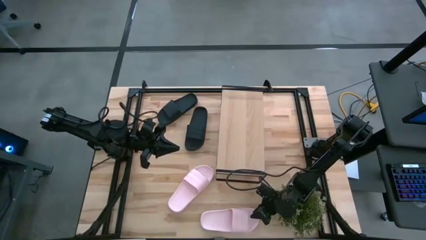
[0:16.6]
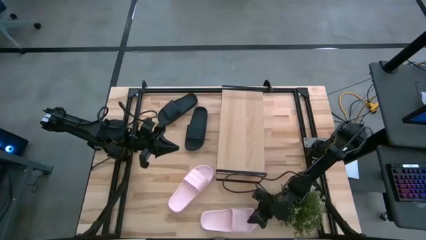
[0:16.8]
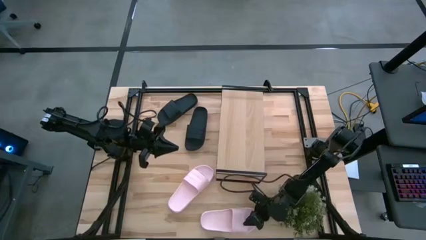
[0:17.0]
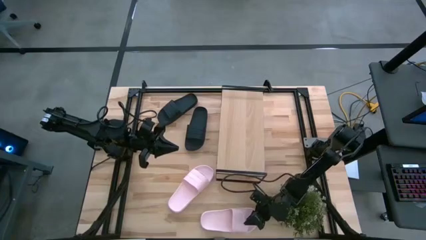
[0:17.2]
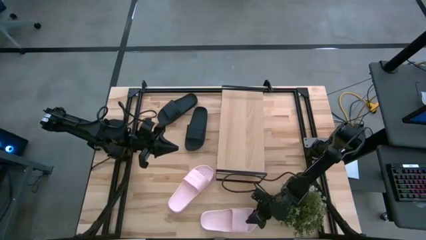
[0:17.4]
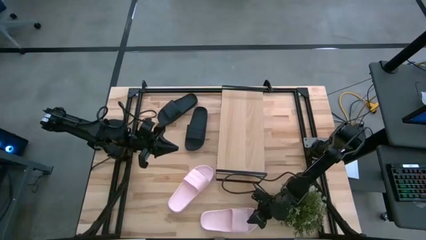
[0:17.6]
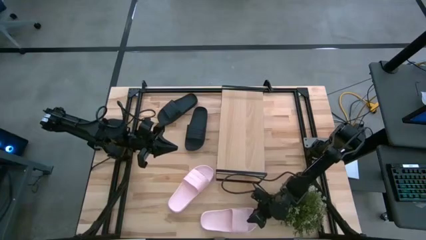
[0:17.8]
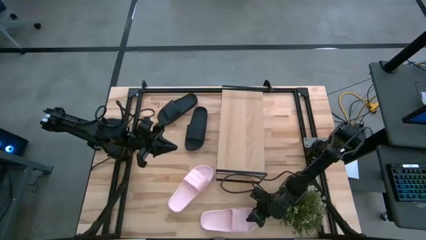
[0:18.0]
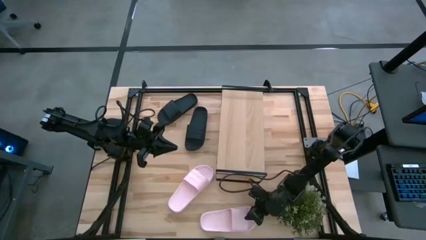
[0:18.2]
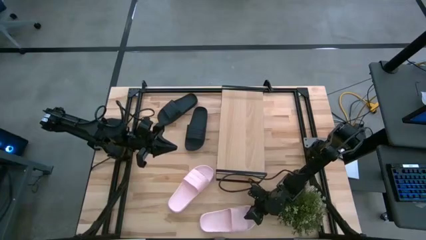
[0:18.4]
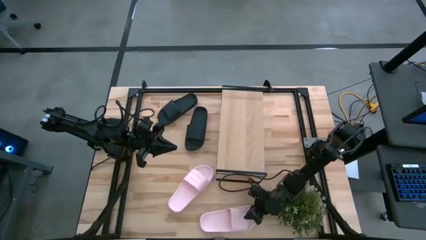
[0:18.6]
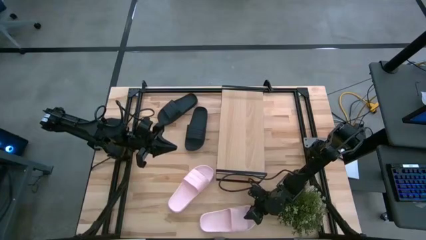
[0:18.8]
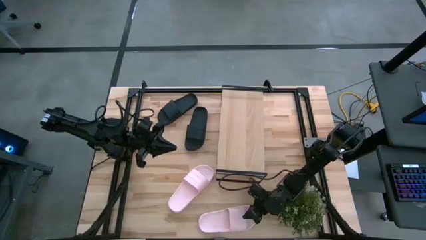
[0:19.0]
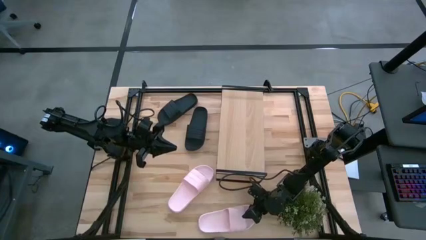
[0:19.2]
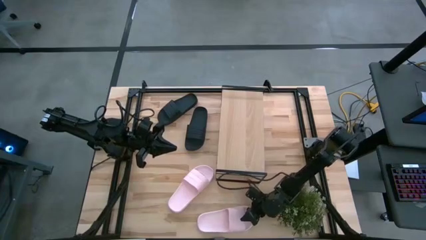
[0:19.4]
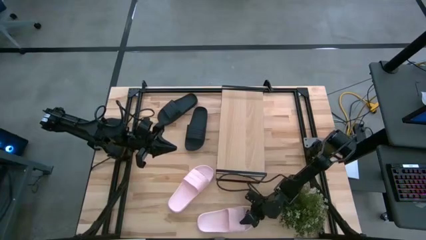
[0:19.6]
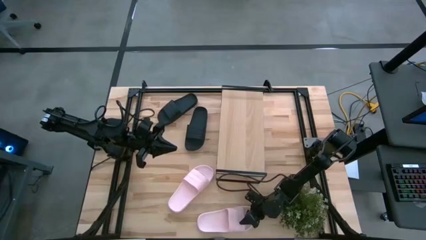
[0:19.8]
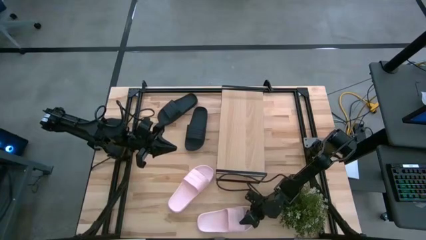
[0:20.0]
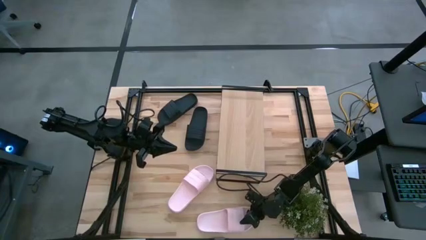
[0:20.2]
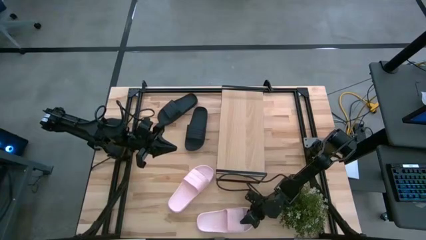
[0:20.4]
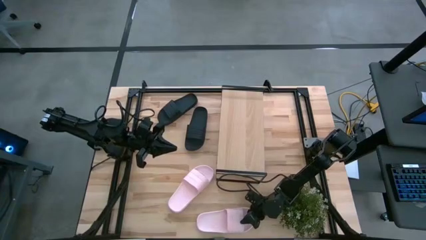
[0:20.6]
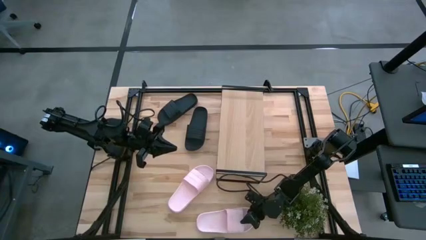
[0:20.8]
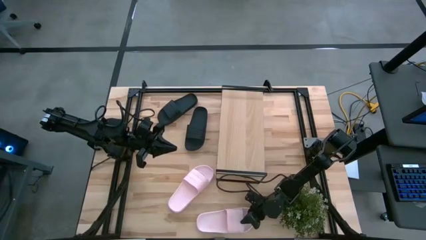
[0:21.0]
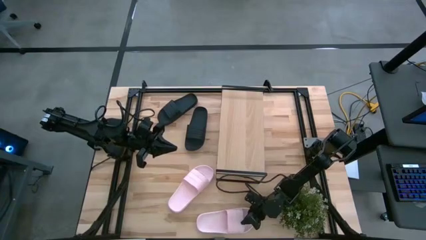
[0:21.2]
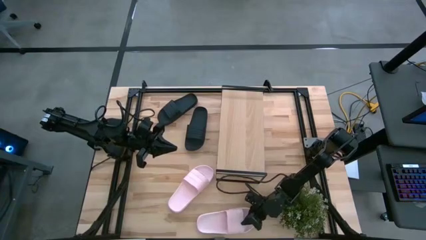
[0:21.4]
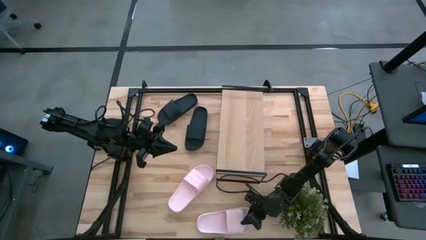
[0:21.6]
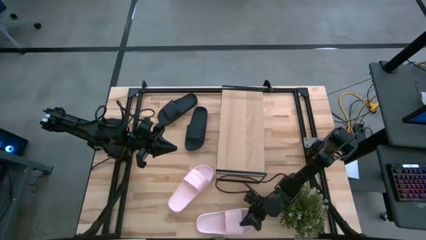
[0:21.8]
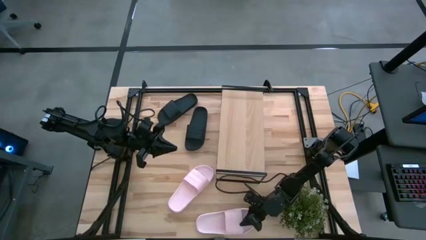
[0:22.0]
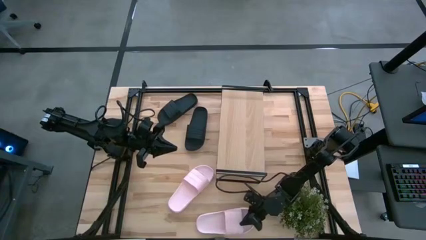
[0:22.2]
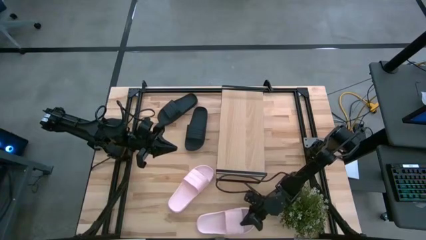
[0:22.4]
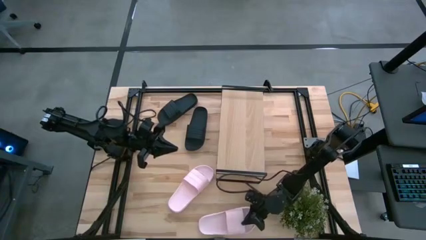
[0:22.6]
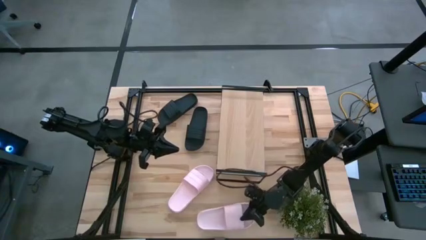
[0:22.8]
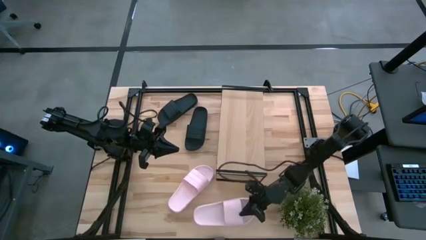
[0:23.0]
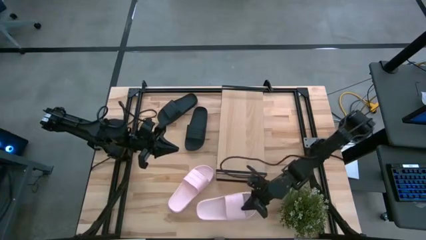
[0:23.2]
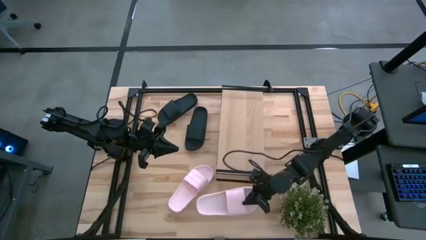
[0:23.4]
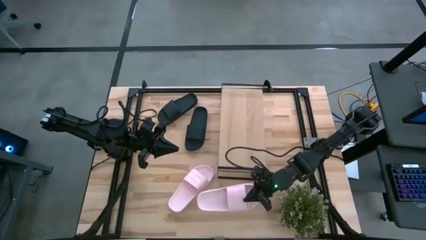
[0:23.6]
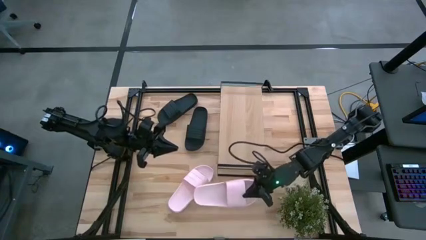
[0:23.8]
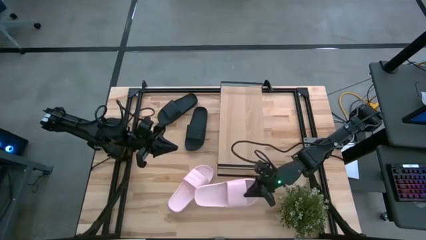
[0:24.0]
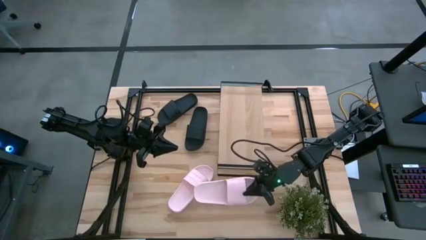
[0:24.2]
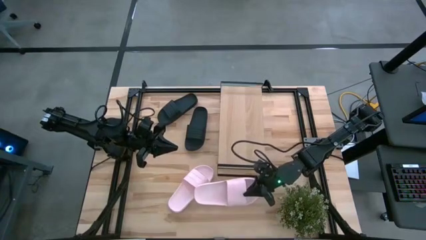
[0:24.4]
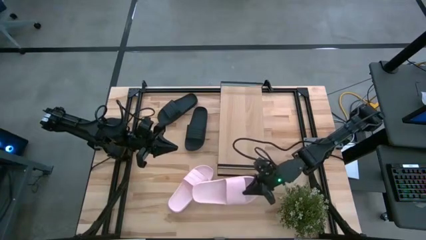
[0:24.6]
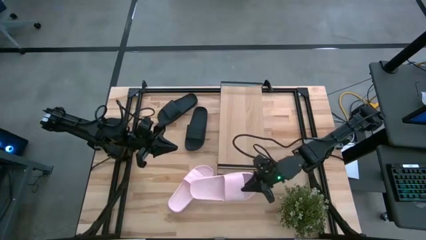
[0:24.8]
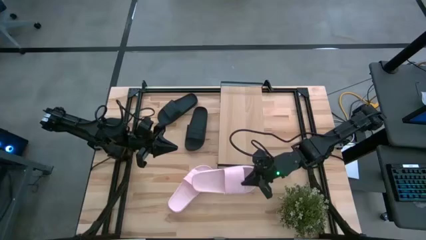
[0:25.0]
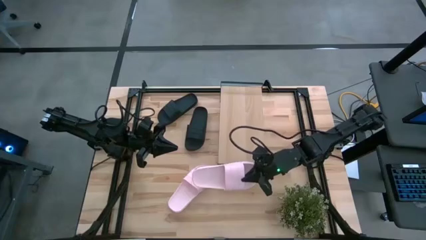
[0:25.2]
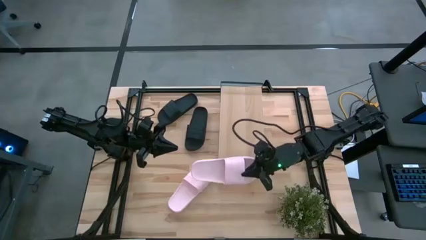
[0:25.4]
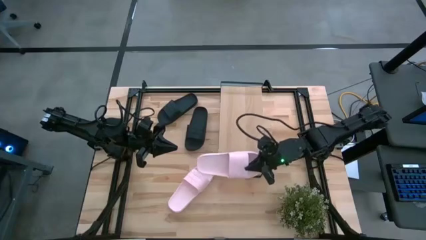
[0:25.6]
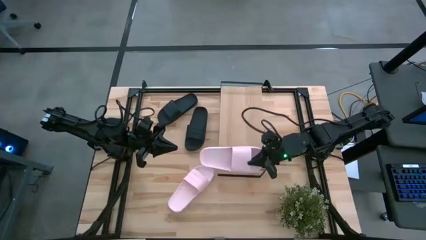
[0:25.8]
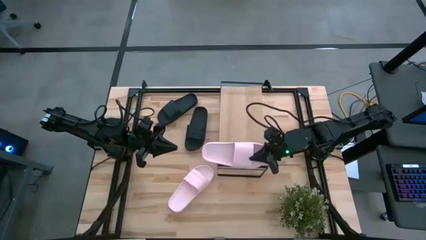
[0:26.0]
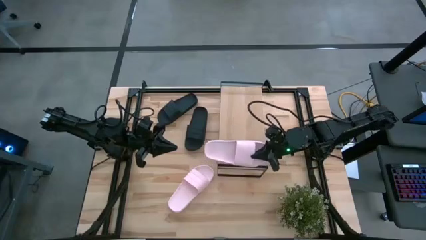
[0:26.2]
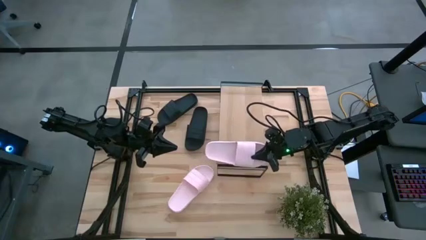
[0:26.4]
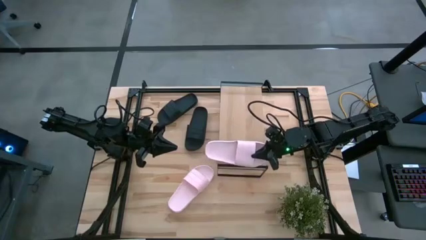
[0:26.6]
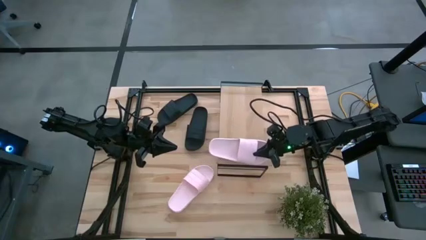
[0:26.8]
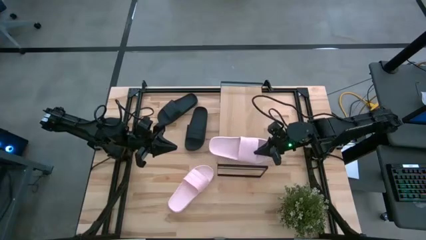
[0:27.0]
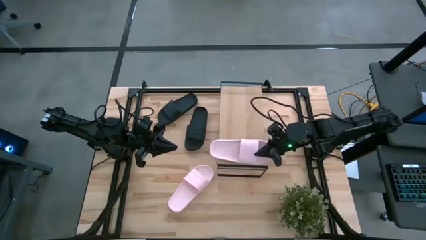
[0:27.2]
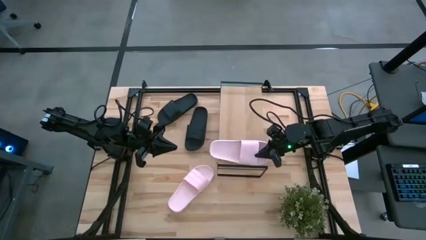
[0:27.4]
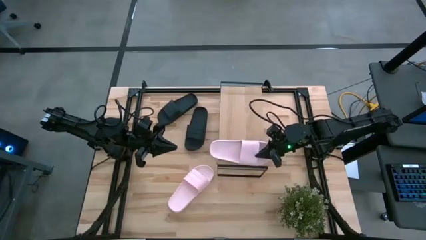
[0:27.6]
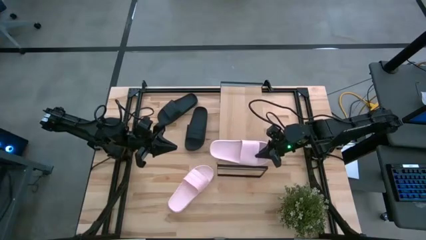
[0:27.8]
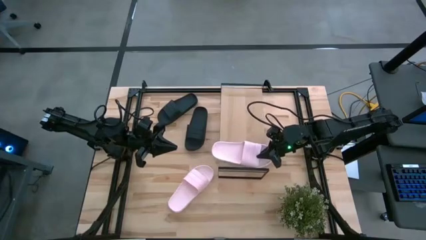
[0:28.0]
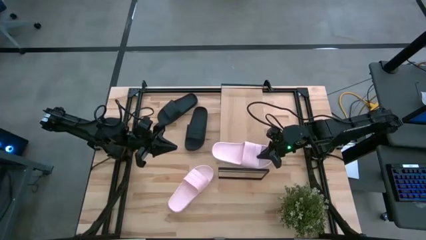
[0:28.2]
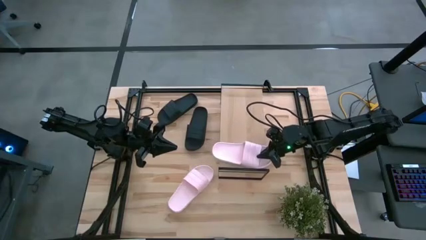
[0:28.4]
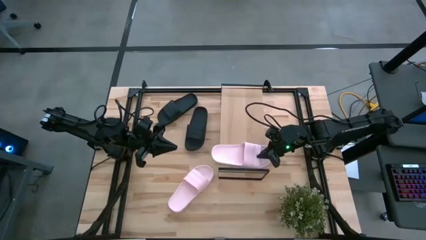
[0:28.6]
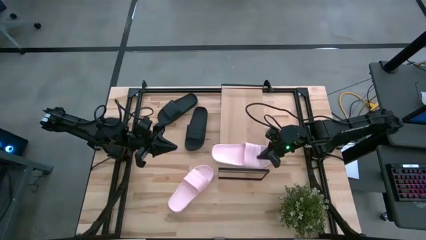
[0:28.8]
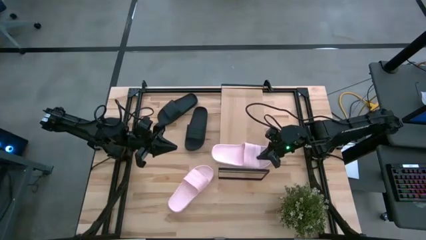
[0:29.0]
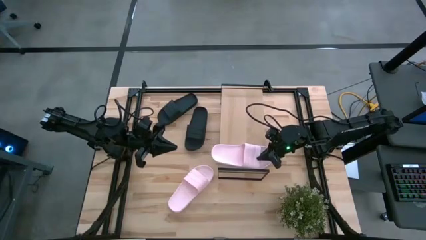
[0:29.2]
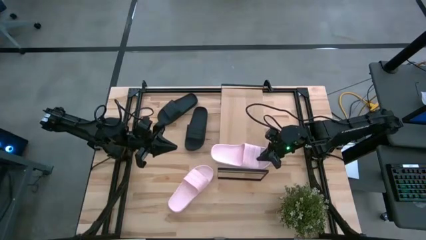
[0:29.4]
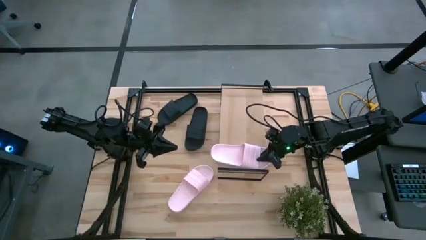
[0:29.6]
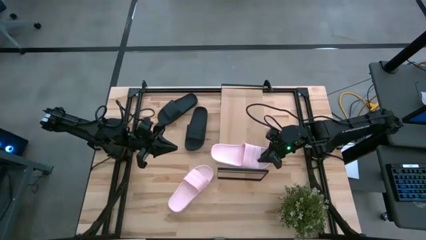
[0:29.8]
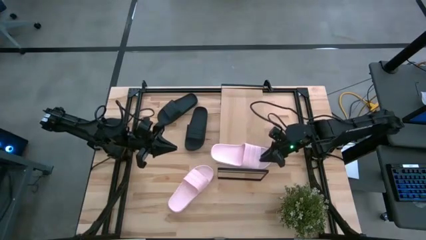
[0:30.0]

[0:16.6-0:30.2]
Task: Pick and place slides into the shelf
Put the bottom light pink slipper on the shelf
